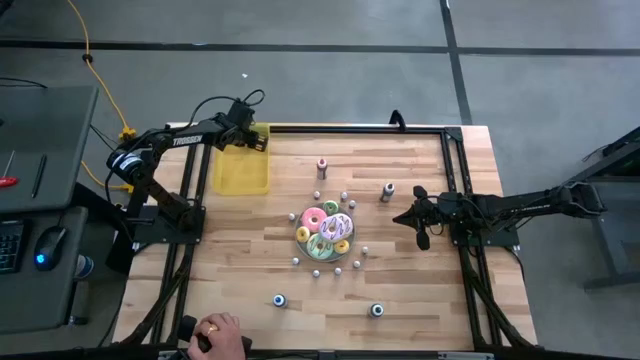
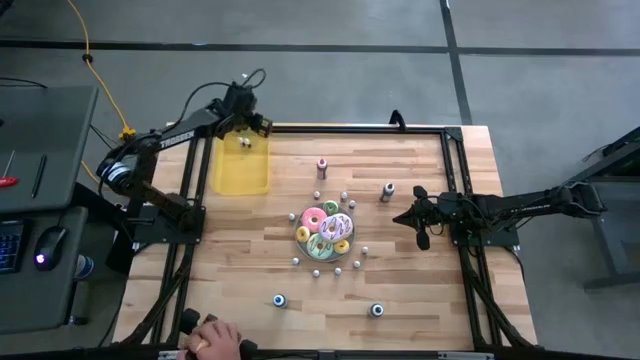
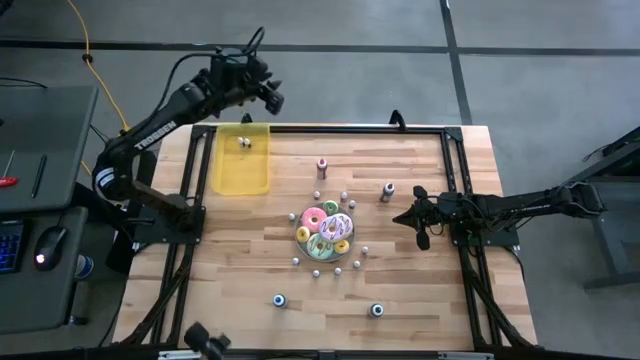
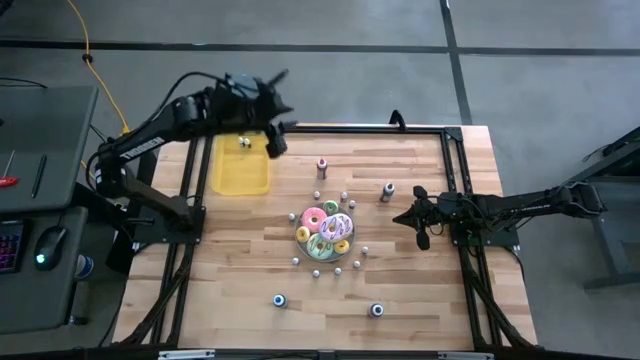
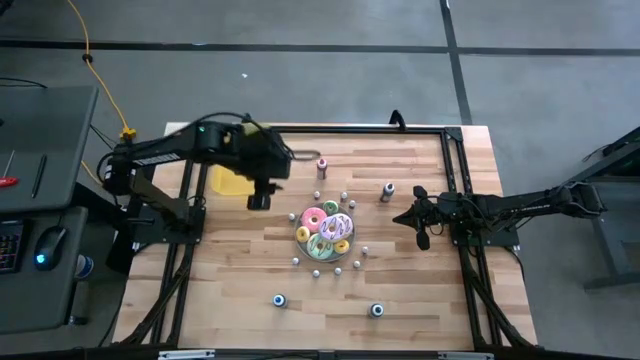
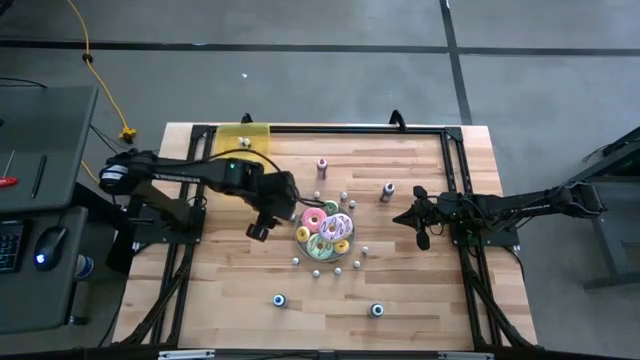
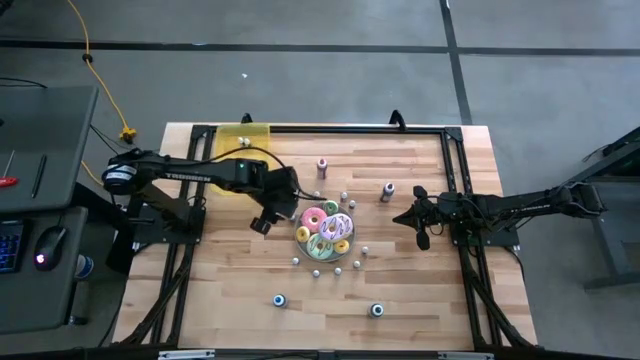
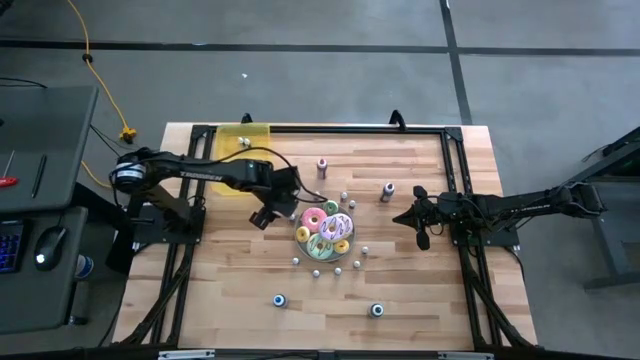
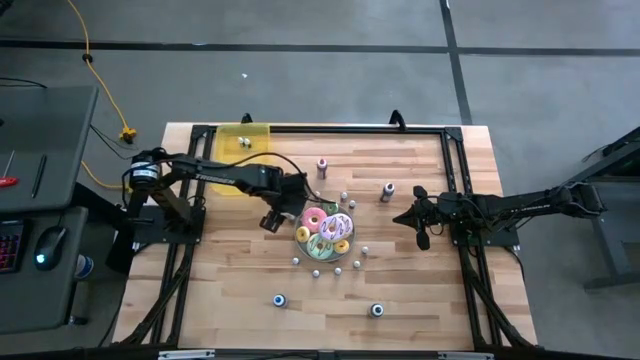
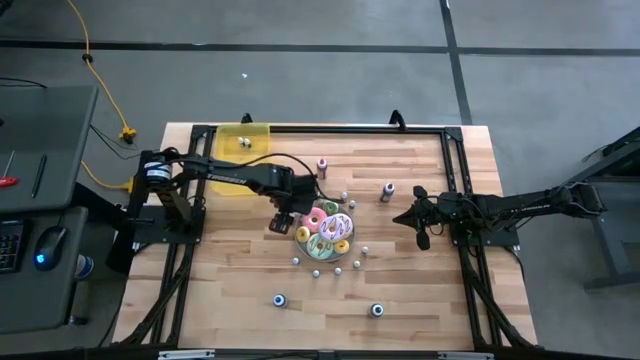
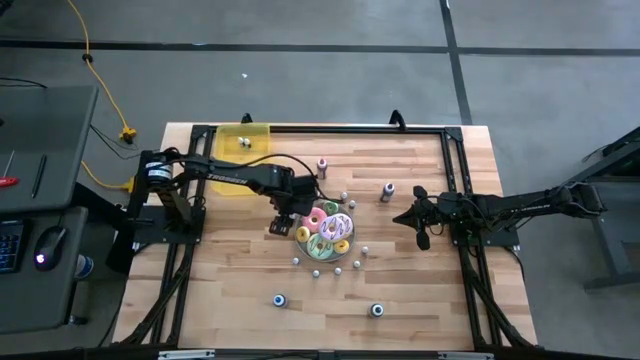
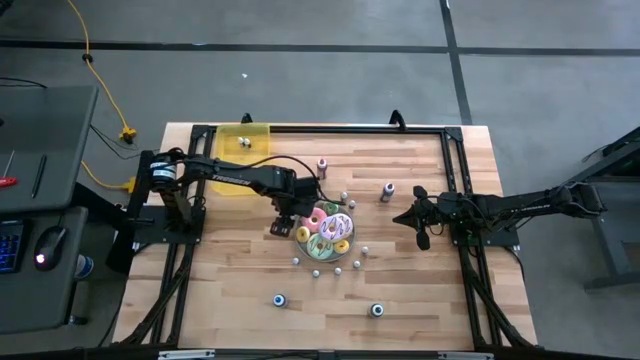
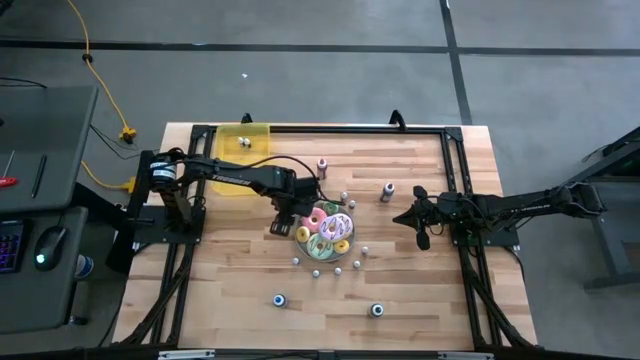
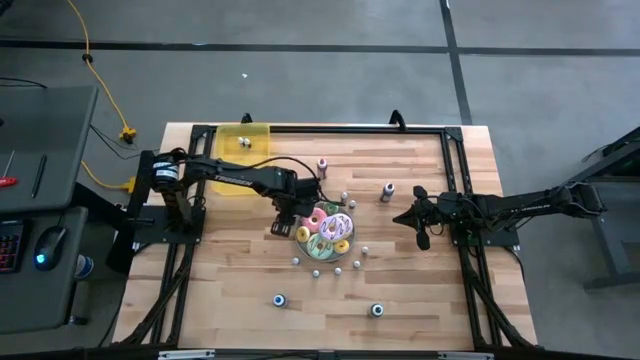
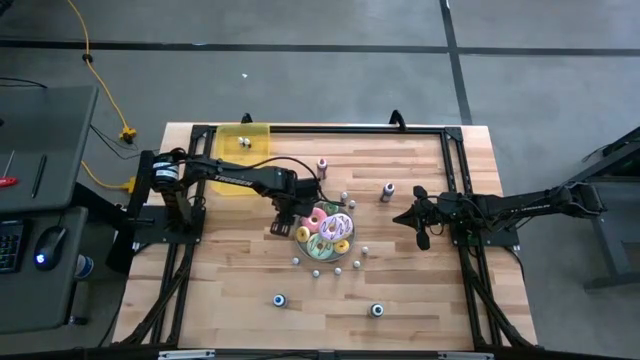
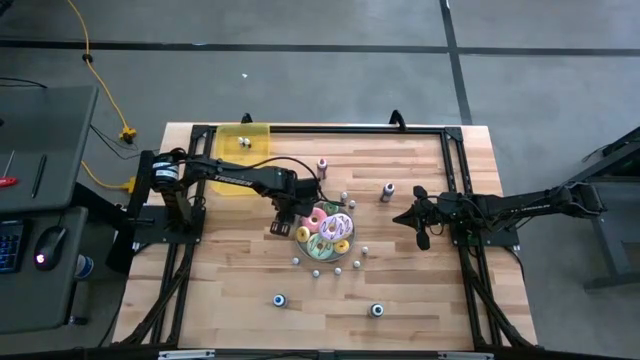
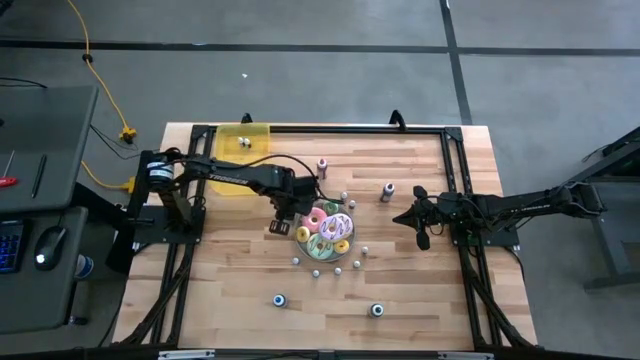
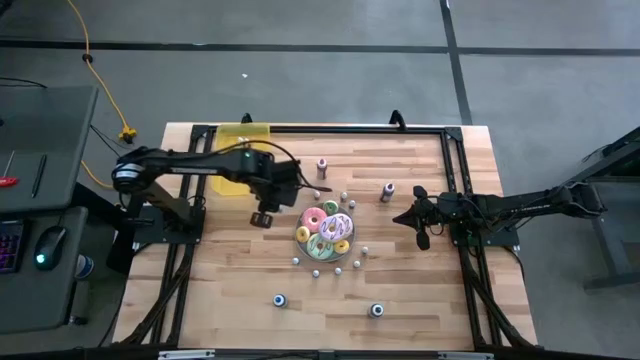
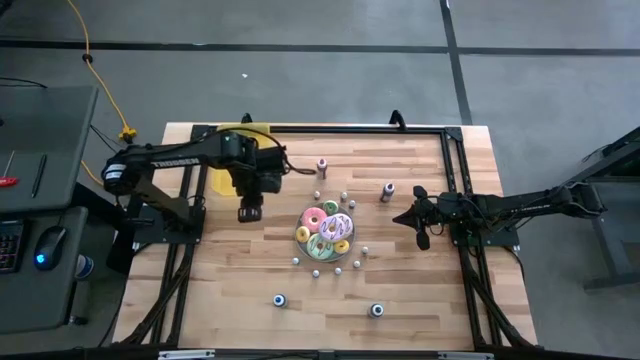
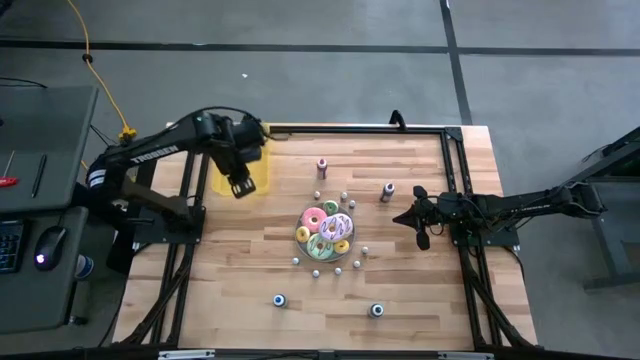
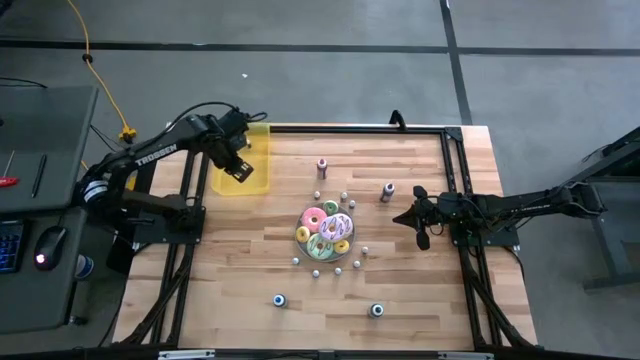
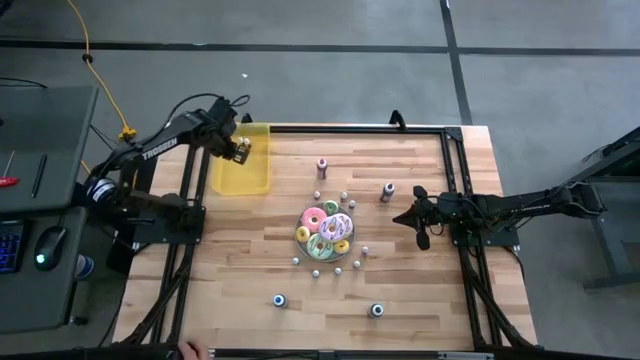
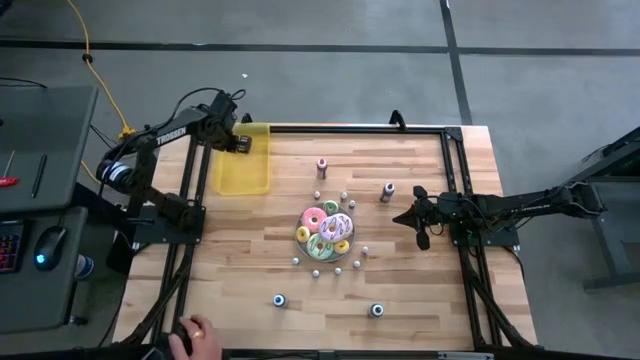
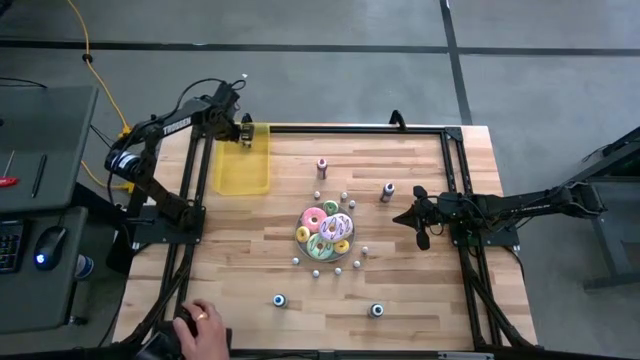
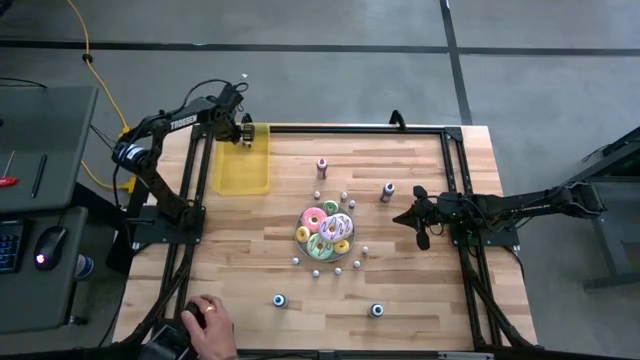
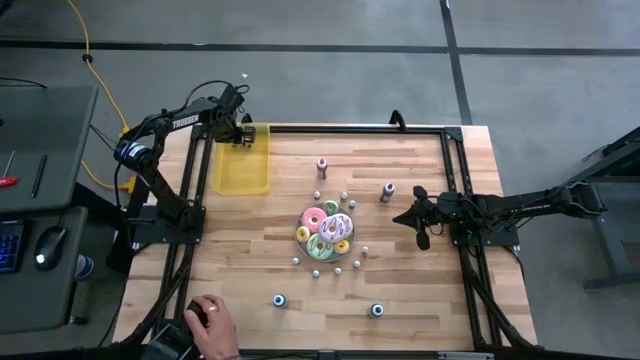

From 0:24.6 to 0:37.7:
Task: Pick & Place food coloring
Put the small black food coloring bottle into the yellow bin

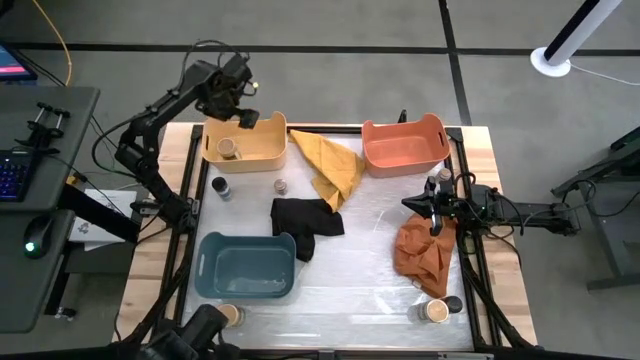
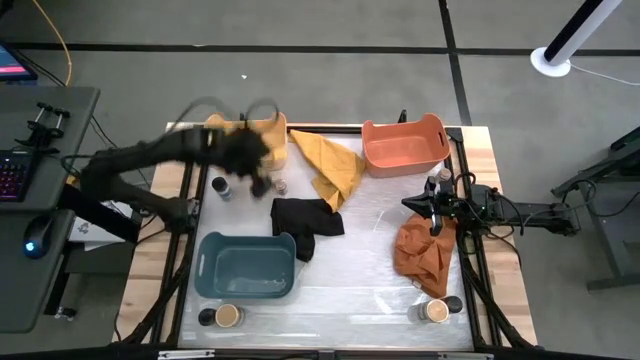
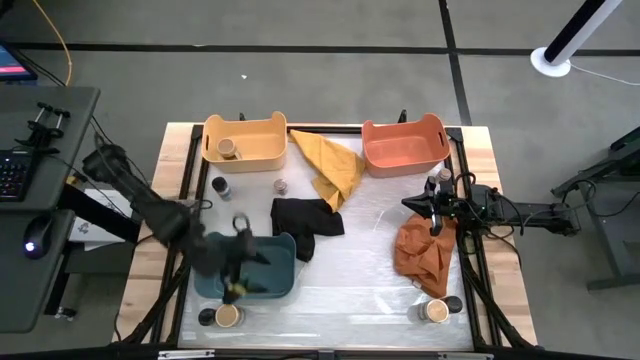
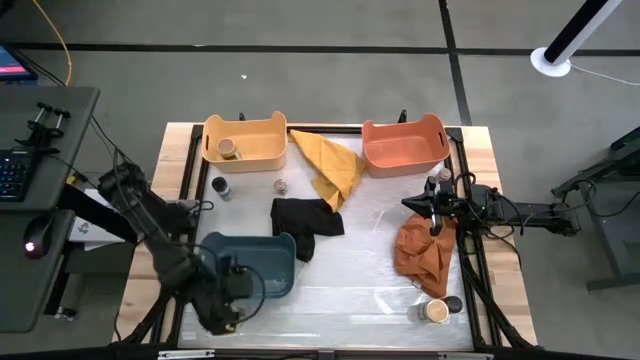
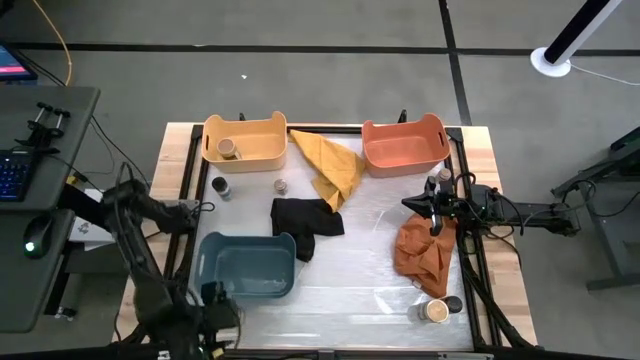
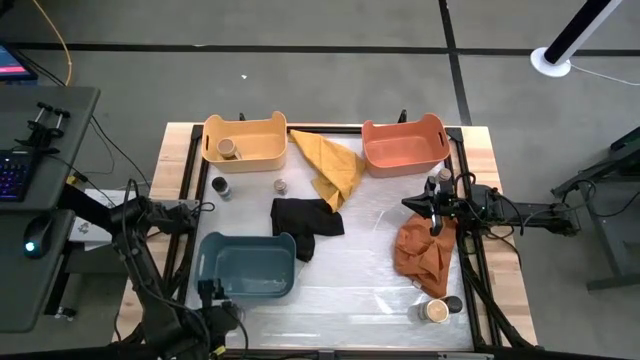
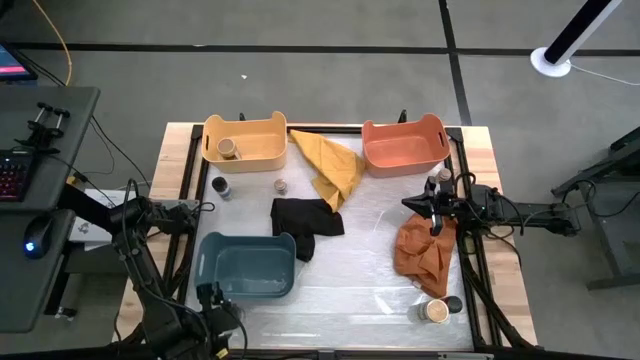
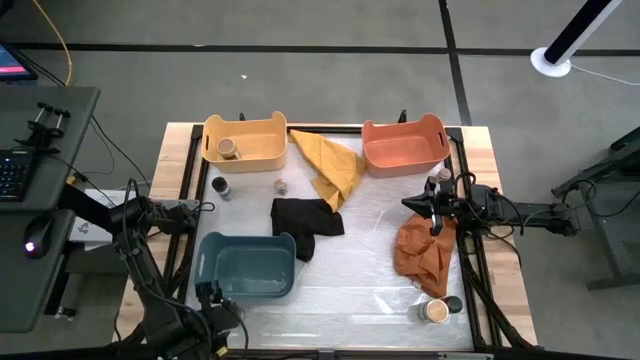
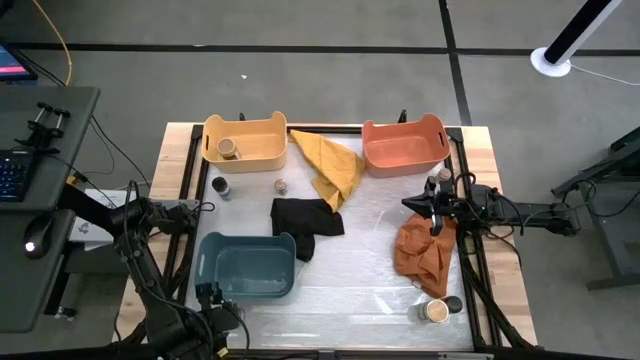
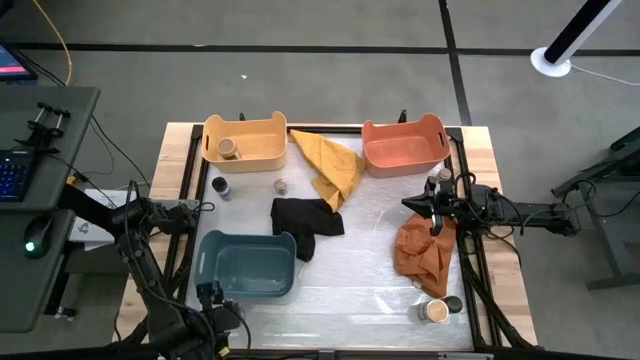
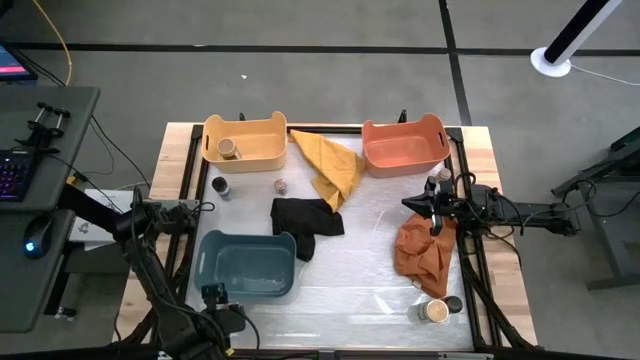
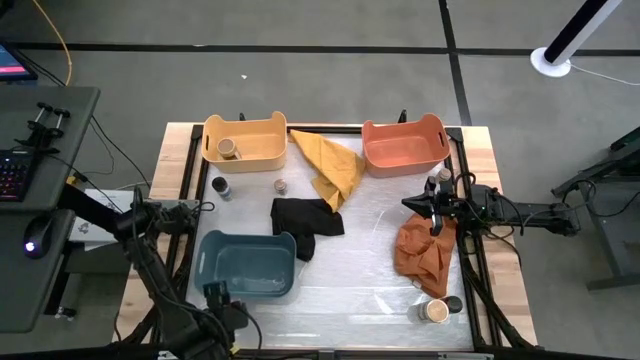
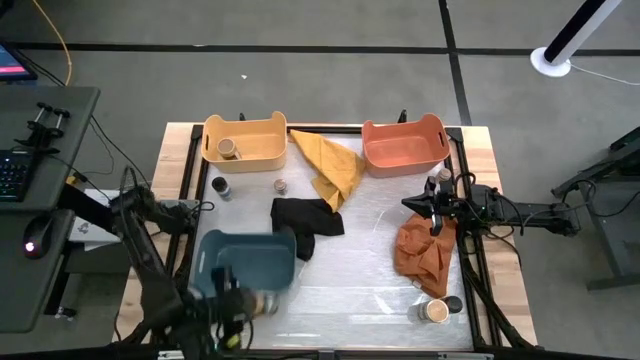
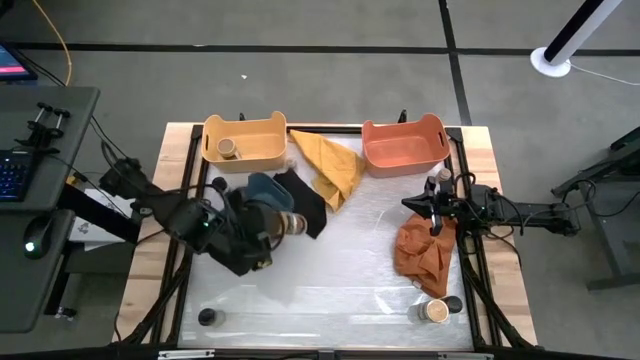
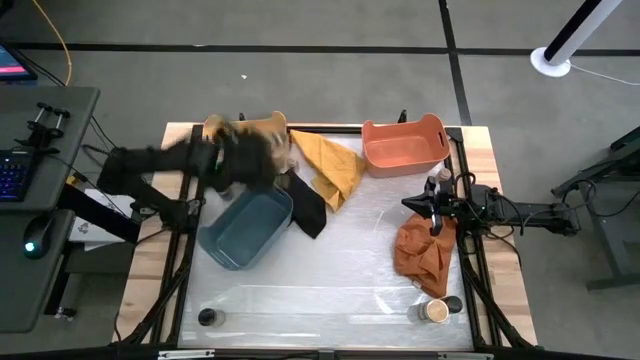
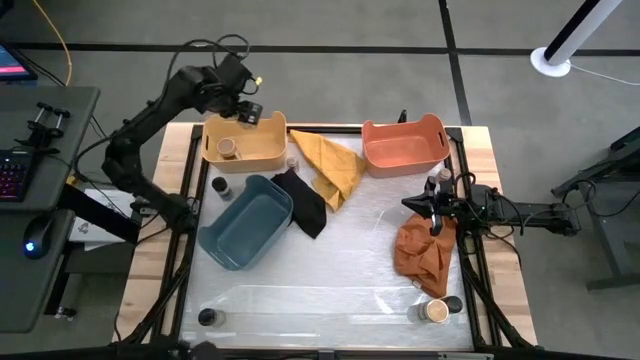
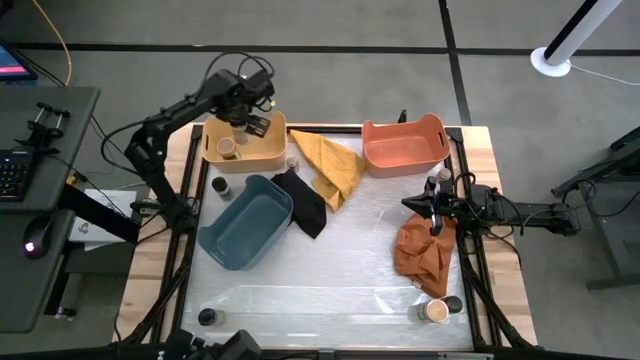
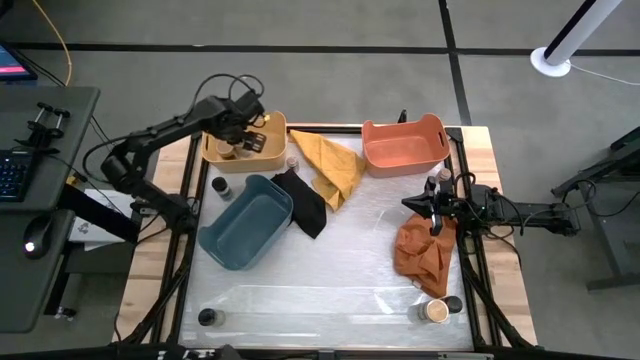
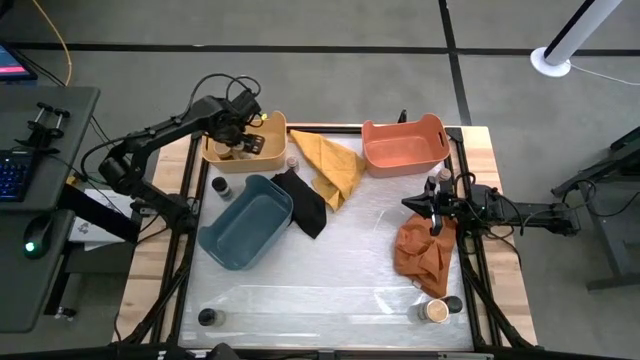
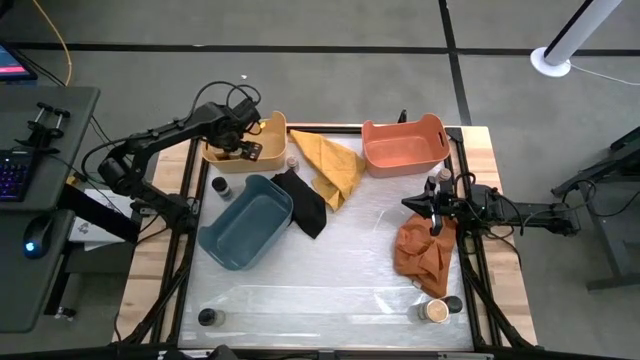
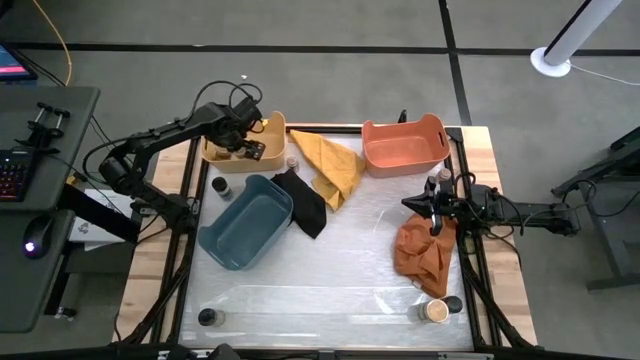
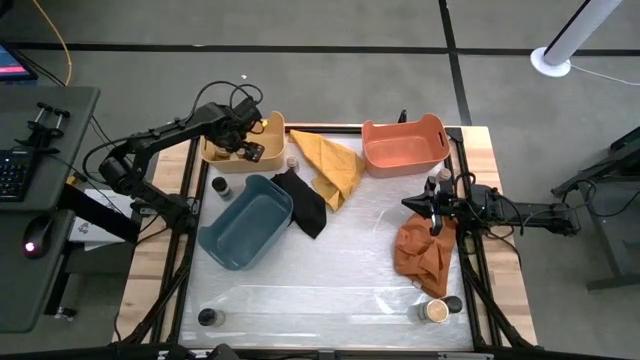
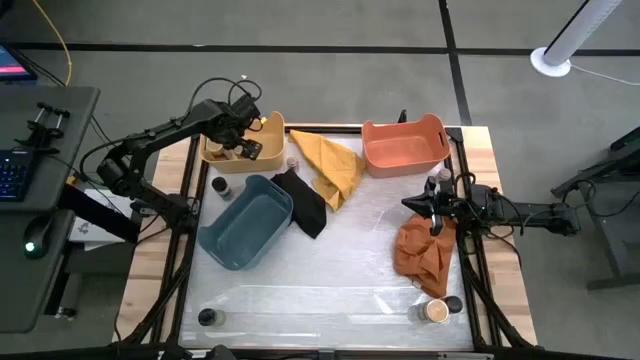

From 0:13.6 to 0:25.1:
Task: Sort spices by type
Put the left gold spice bottle into the yellow bin
